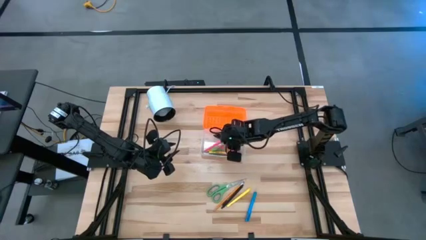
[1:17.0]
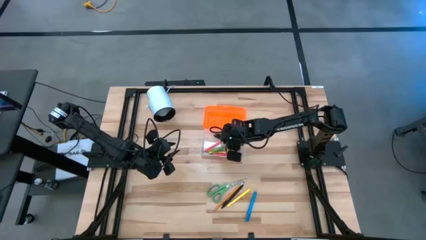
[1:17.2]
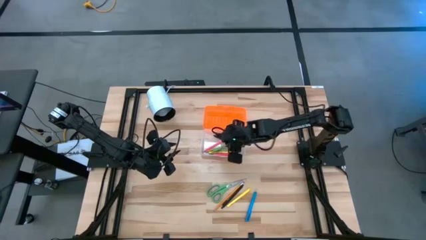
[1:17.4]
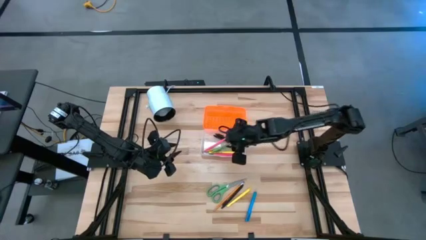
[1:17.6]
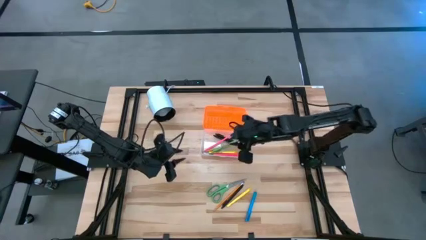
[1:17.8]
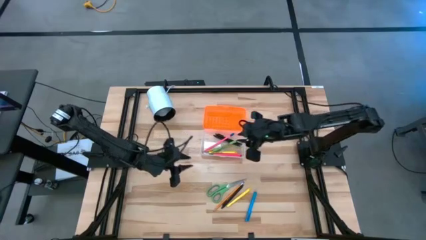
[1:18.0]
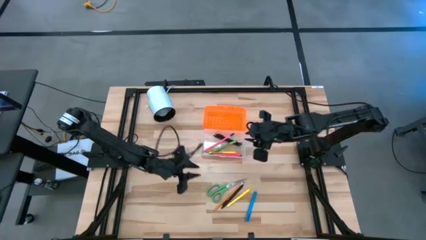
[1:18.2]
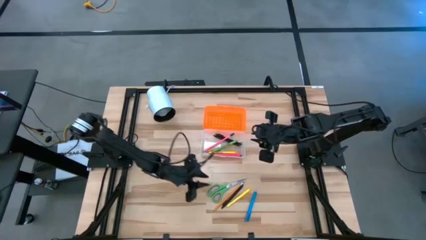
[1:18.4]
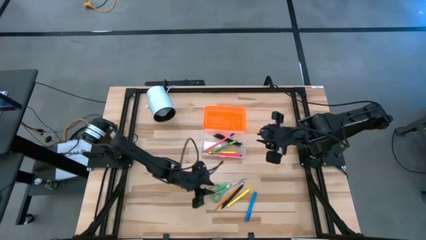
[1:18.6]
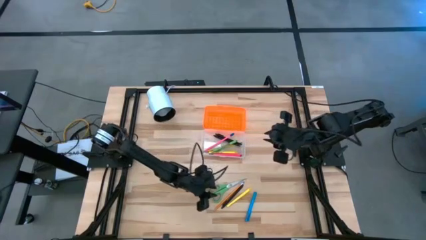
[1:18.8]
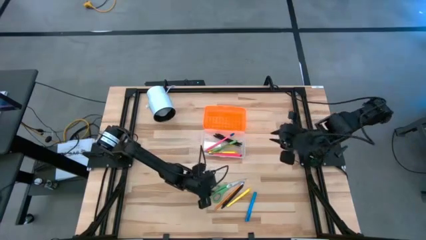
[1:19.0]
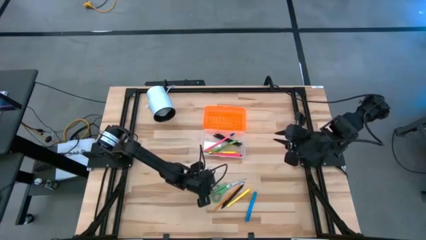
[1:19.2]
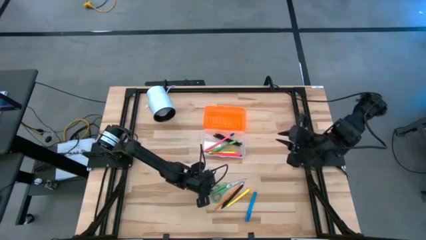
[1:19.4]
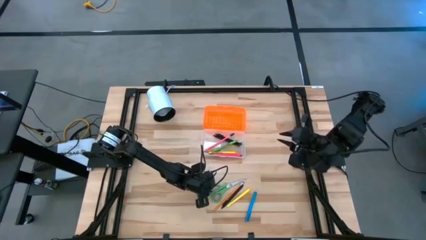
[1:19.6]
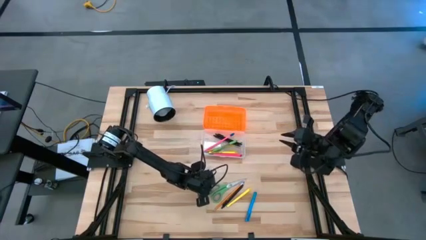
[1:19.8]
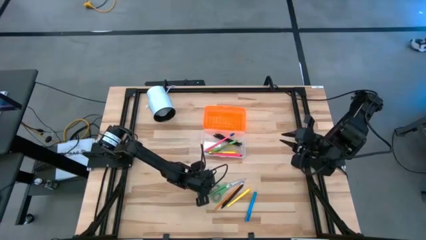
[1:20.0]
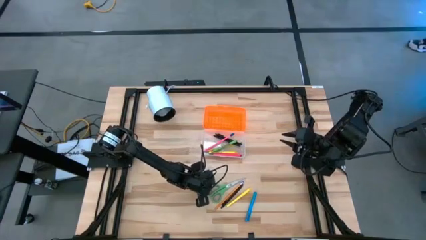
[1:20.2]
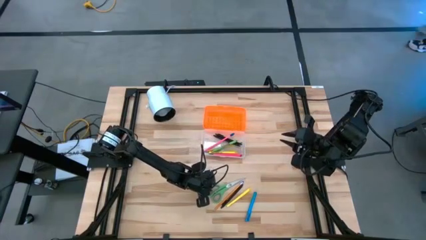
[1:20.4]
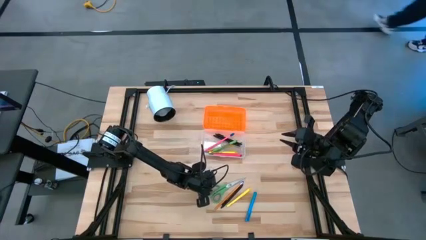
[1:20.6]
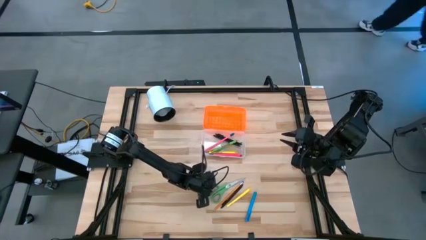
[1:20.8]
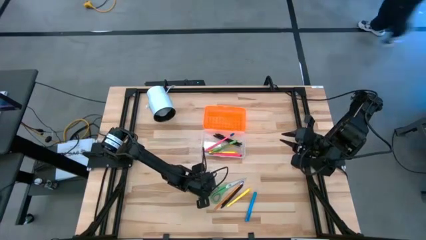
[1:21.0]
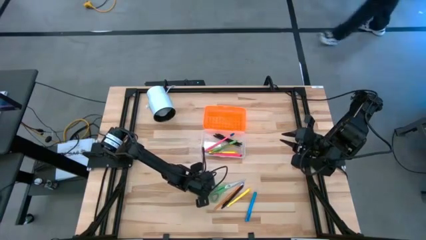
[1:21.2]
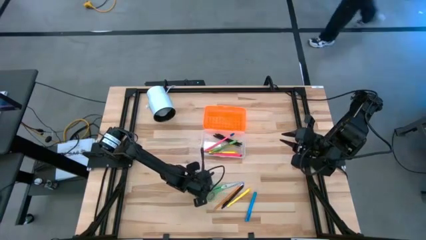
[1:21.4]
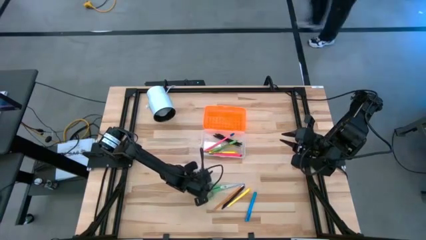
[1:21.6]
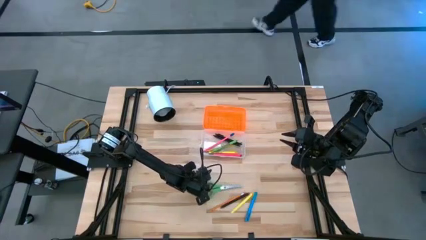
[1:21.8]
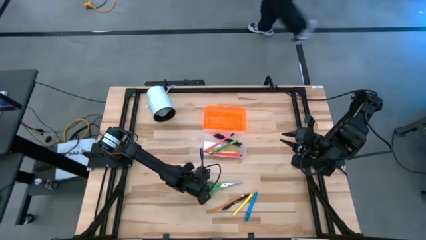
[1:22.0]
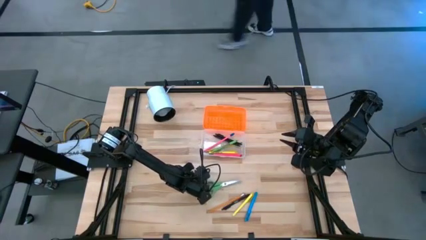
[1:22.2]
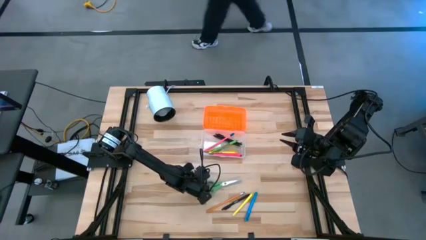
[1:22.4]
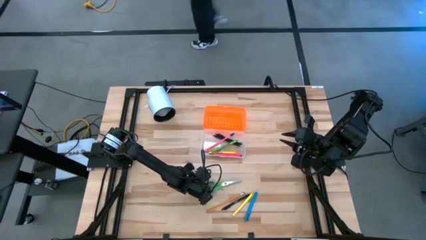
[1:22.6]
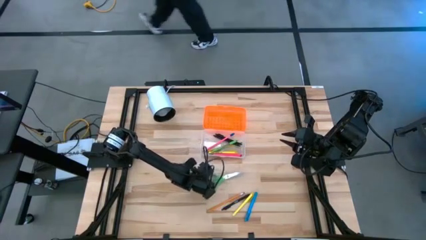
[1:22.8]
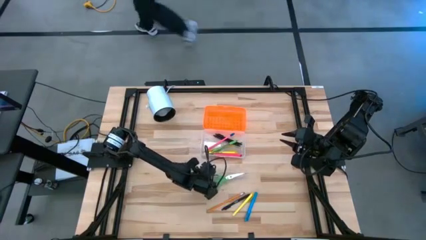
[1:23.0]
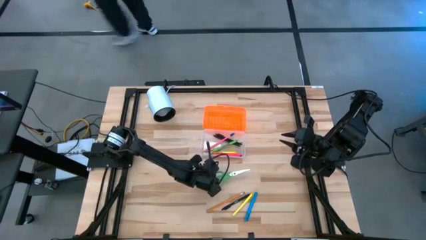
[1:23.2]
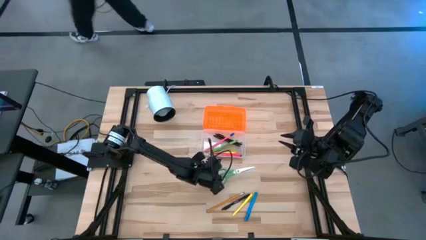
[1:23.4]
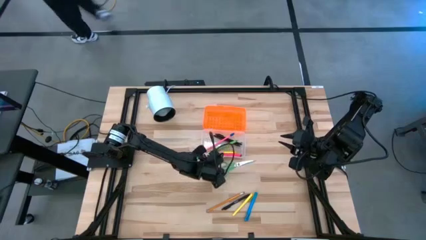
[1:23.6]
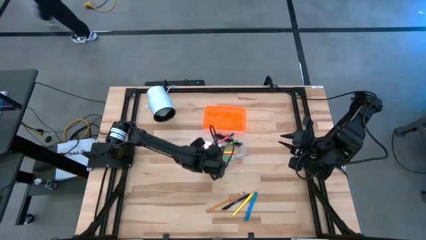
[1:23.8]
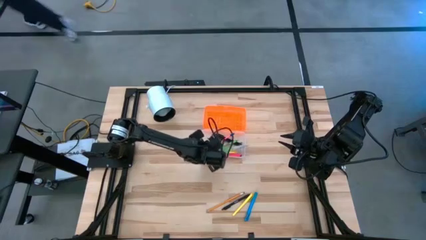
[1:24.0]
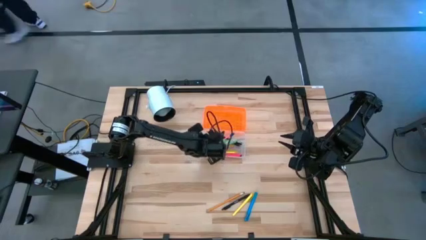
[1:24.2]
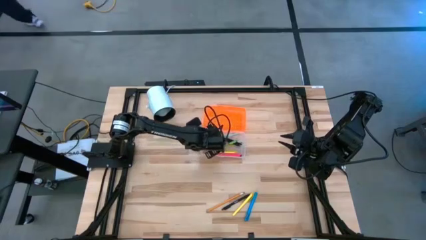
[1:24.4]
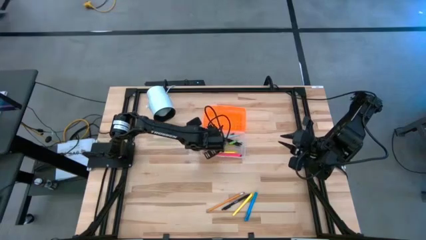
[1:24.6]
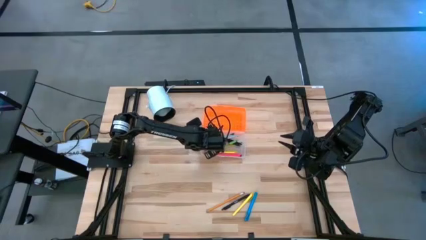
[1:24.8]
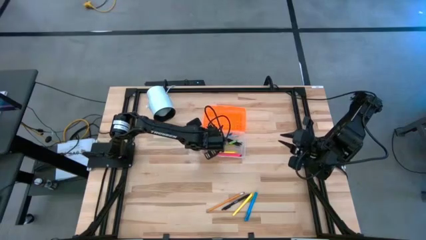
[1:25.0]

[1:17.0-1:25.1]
Task: Pick & place school supplies into a supply box
Put the green scissors into the orange supply box

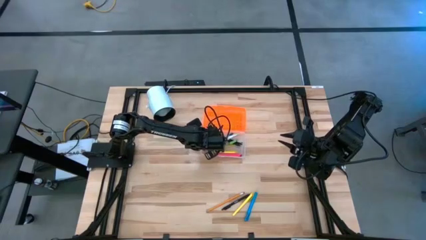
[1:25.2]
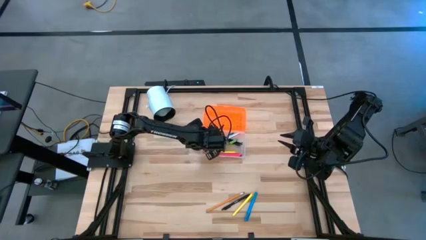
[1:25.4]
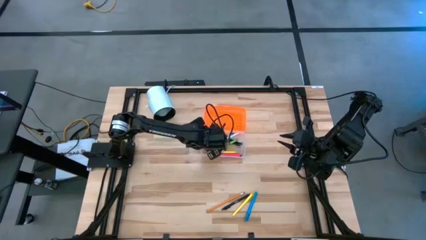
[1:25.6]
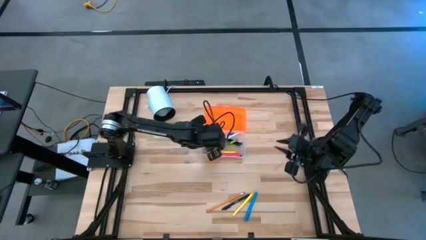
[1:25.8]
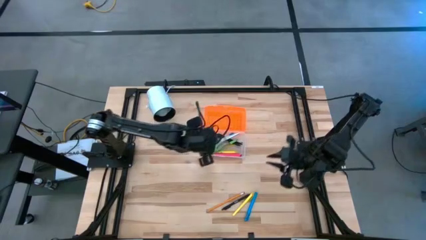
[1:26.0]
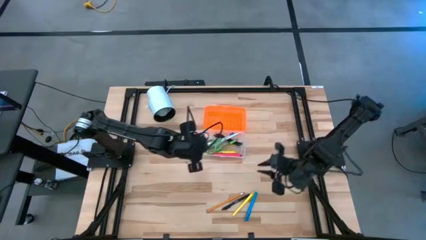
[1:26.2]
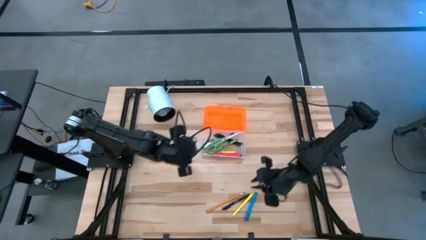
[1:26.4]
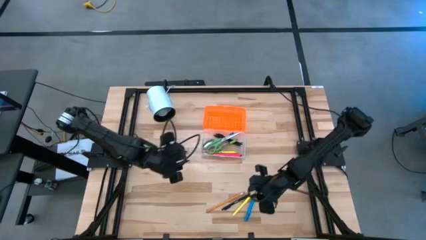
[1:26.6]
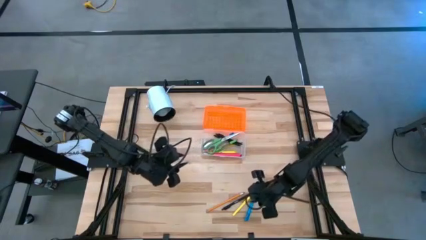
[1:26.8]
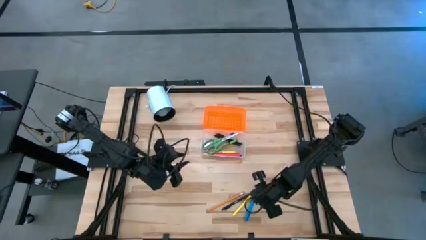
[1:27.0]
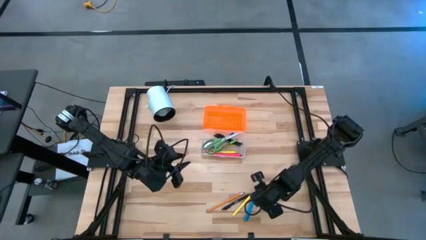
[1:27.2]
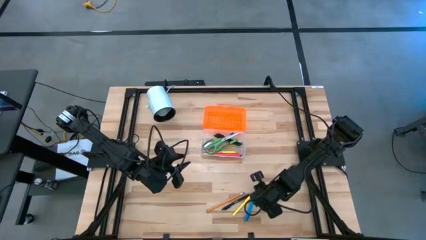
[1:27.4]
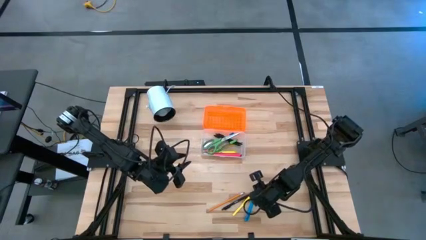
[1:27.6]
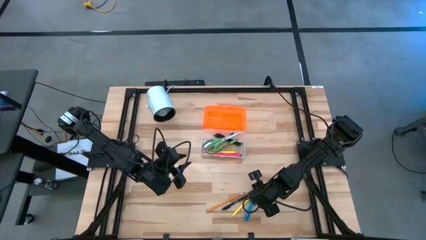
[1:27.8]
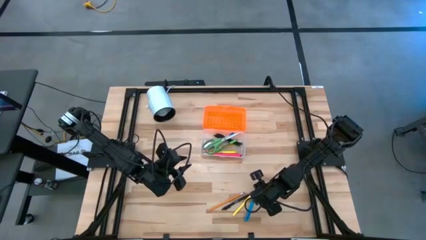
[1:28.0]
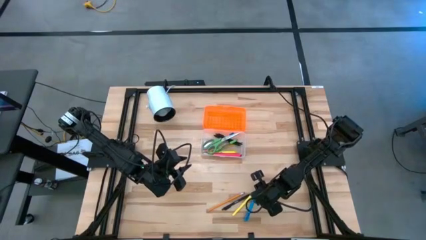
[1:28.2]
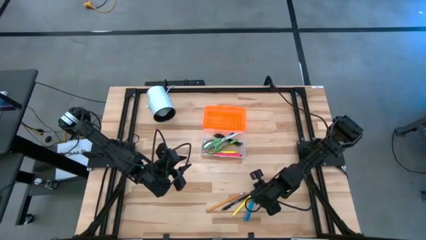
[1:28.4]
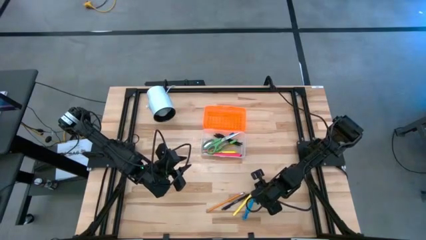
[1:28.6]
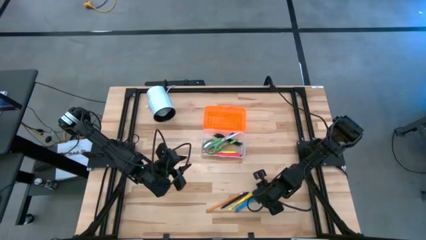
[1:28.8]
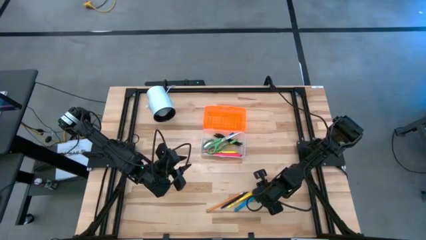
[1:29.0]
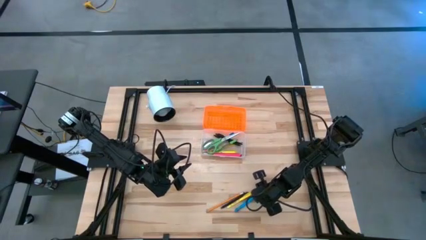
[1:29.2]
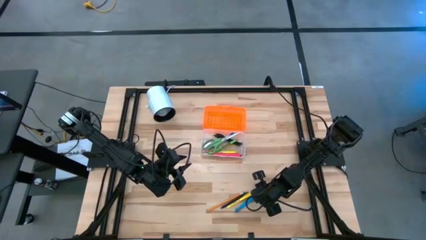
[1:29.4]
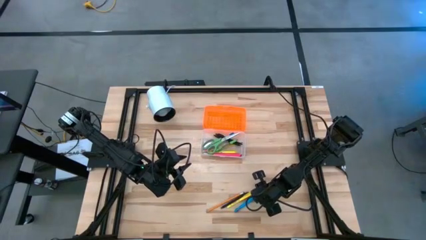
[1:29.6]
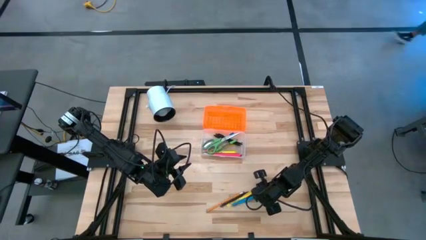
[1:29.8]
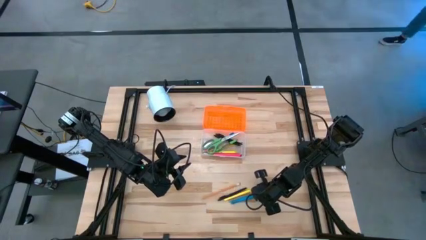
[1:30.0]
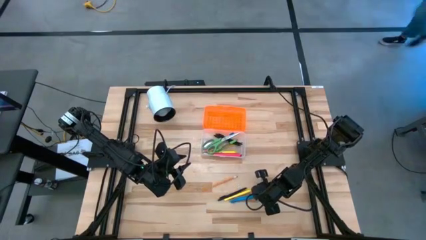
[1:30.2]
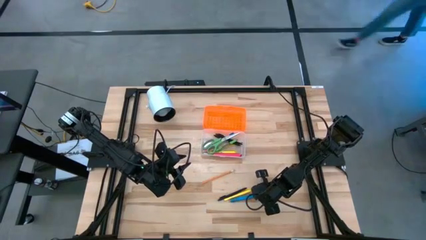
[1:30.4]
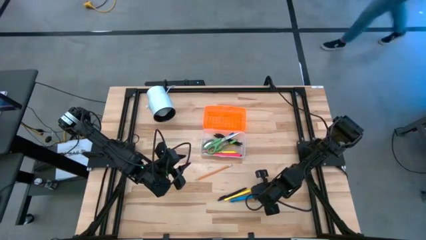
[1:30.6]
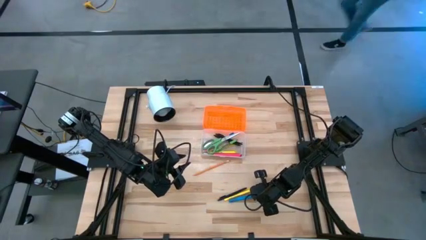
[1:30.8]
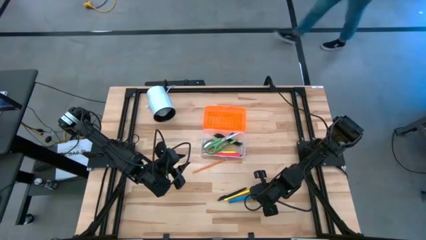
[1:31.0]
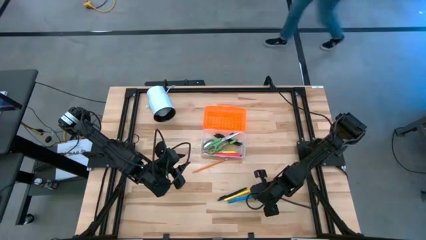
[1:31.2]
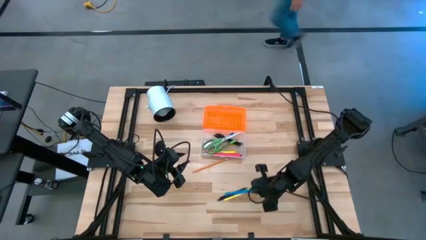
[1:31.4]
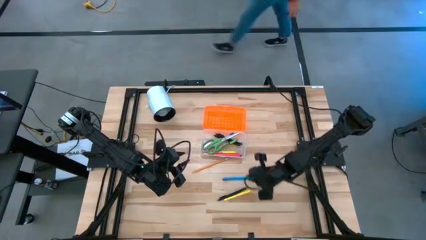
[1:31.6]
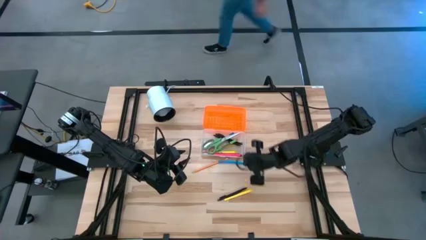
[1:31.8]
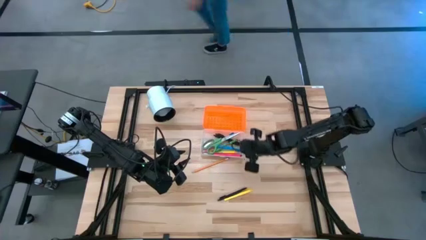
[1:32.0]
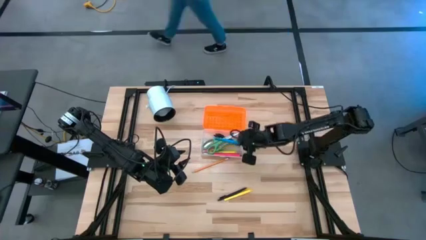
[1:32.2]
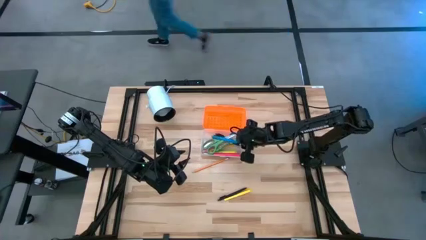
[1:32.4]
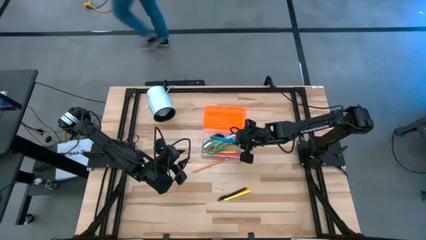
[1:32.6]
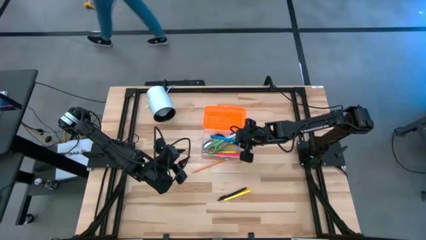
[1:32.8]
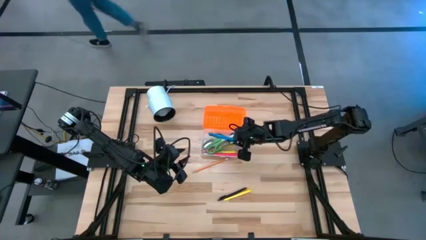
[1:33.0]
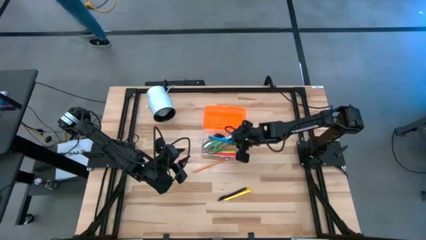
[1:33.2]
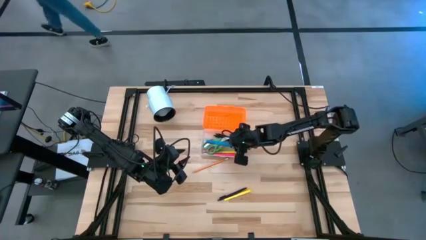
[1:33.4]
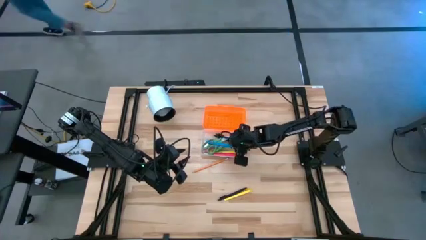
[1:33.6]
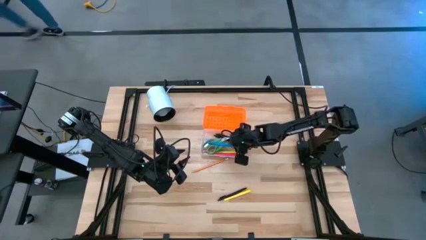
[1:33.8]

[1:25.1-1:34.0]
Put the blue pen into the orange supply box
